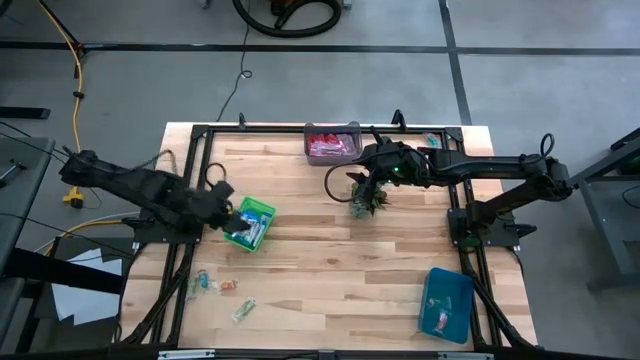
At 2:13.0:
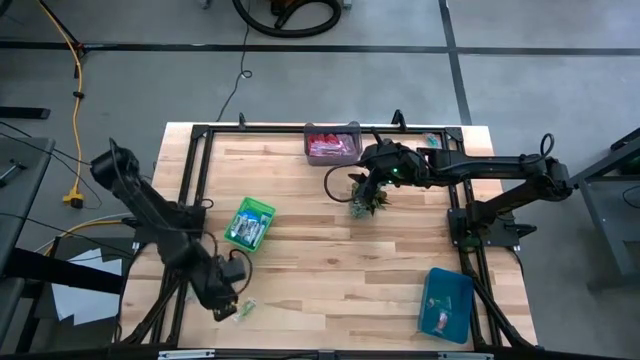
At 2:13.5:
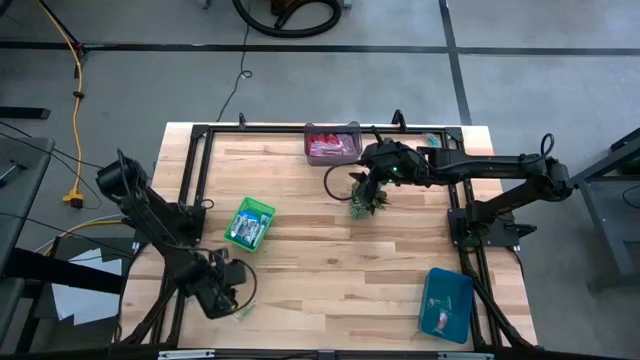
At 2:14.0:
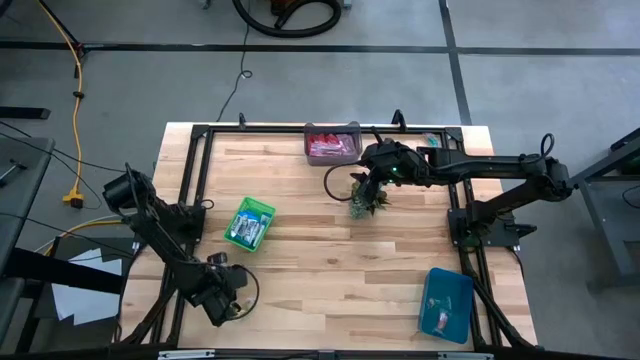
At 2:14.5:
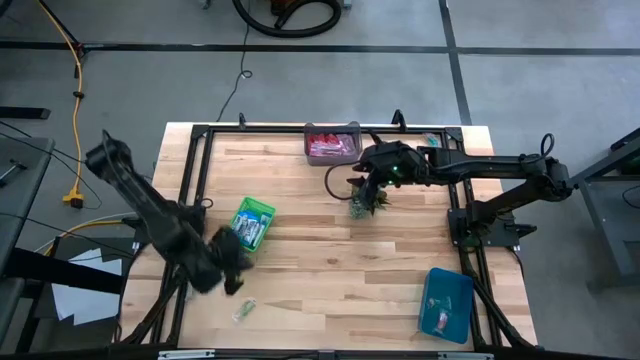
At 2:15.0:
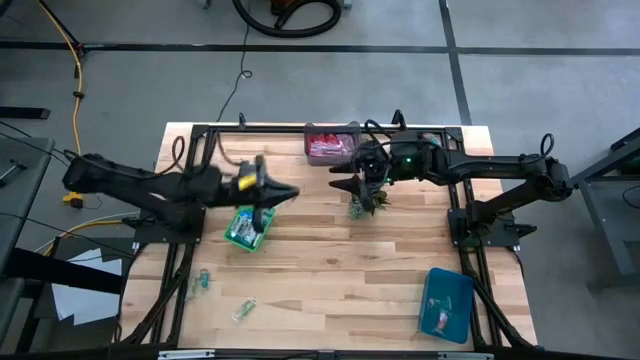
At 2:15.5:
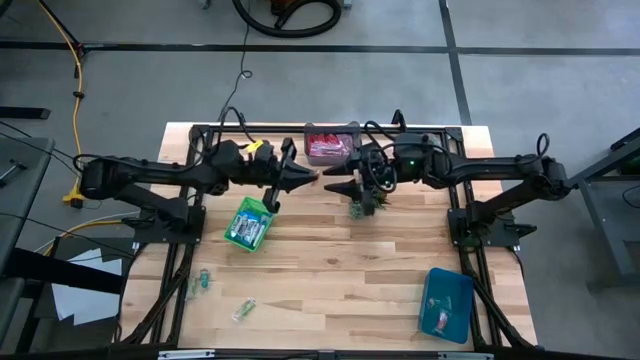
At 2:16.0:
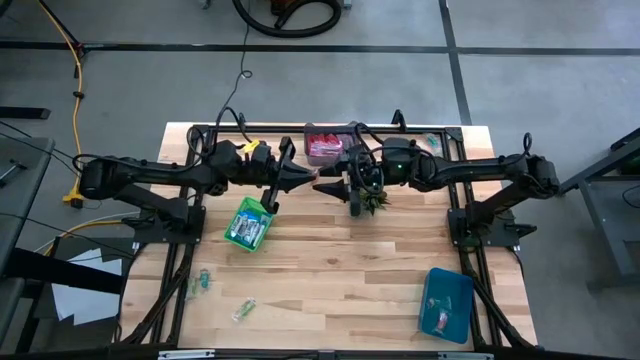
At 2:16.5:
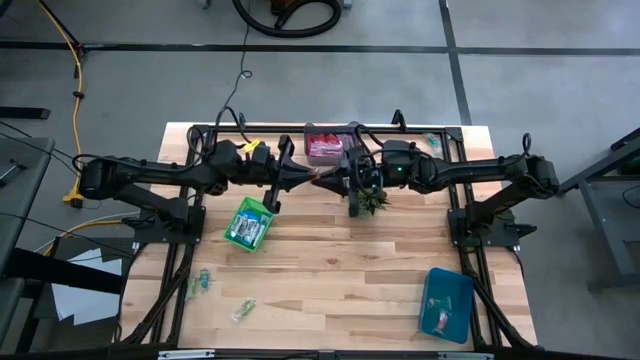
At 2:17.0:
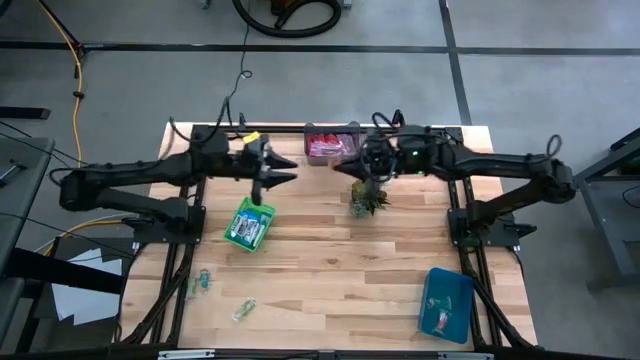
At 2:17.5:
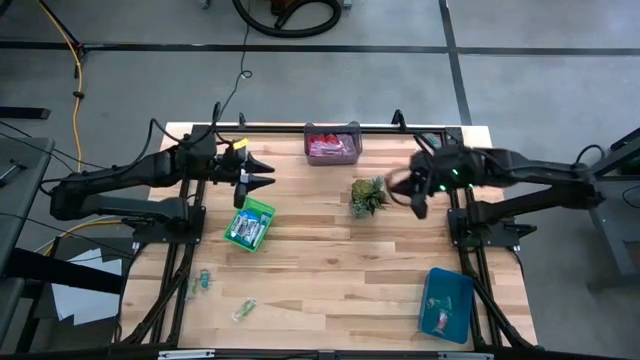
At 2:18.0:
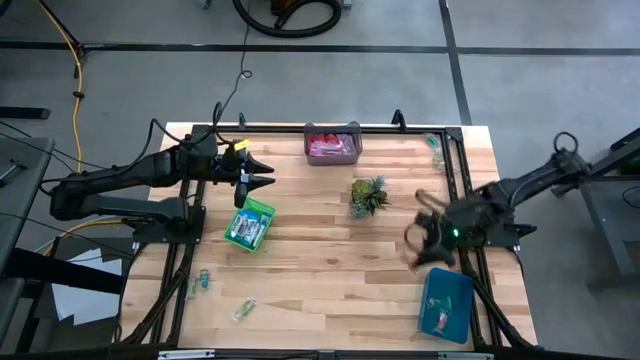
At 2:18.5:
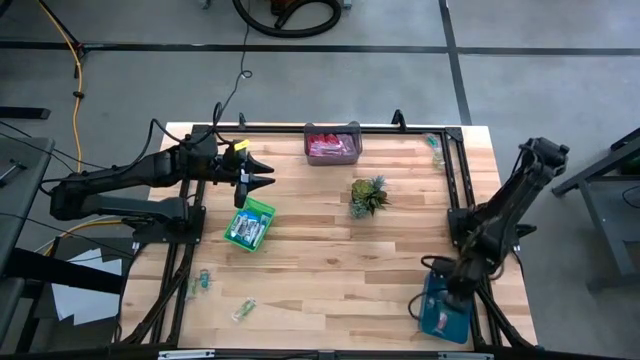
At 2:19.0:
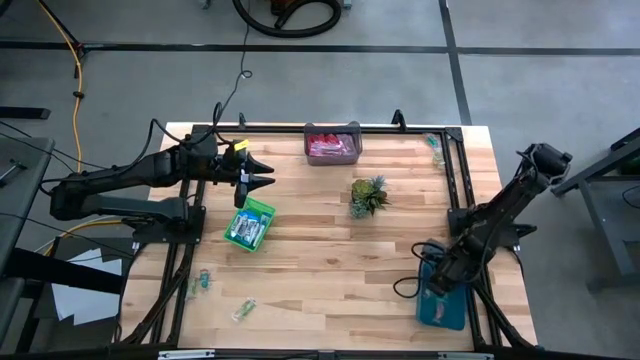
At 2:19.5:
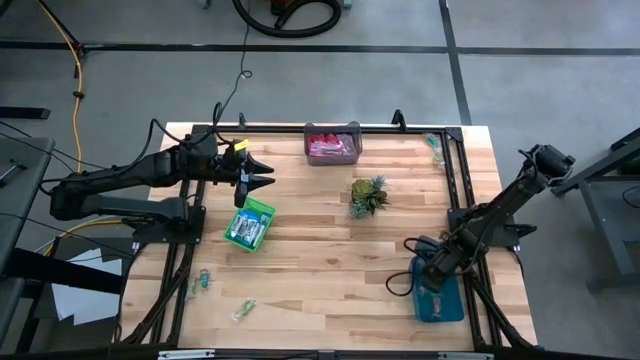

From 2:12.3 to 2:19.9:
Task: Sort candy
Put the transparent candy into the blue bin

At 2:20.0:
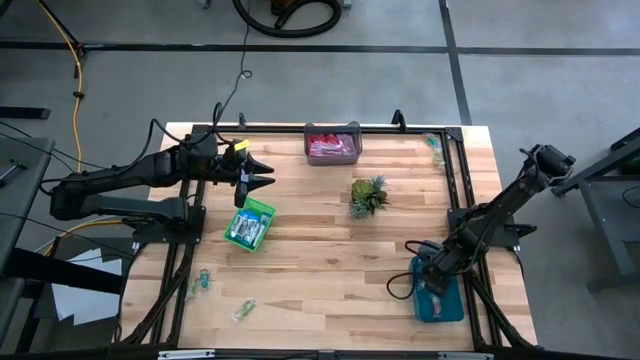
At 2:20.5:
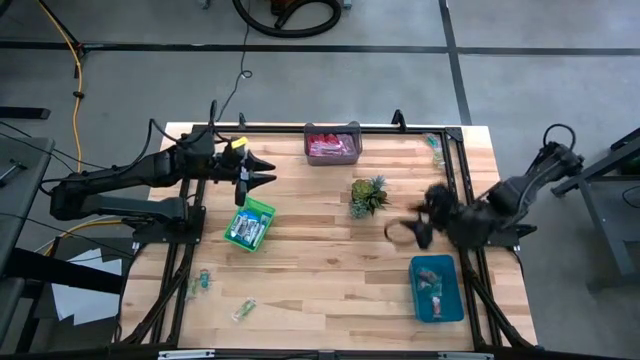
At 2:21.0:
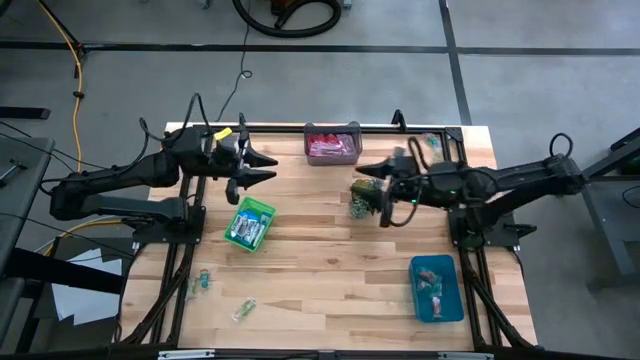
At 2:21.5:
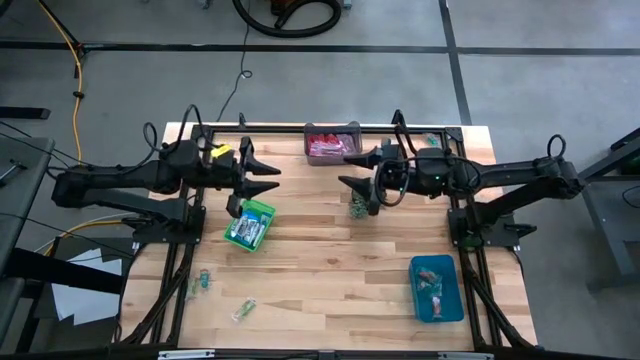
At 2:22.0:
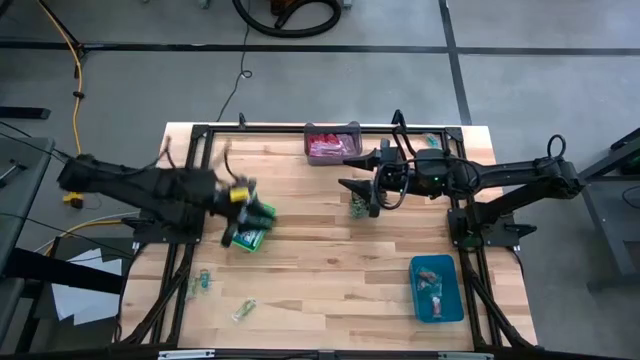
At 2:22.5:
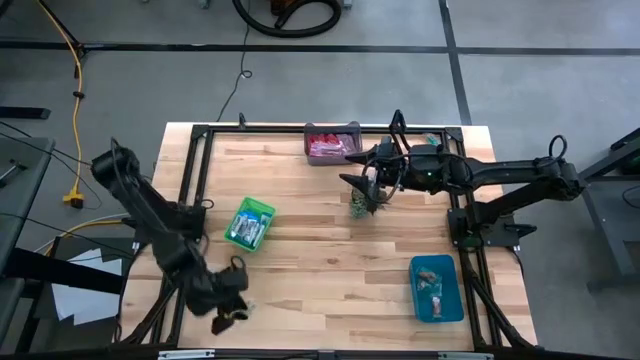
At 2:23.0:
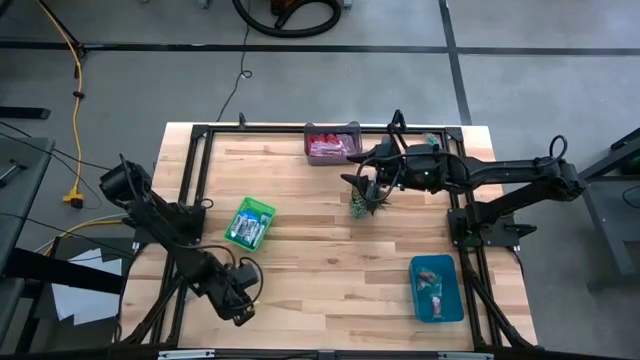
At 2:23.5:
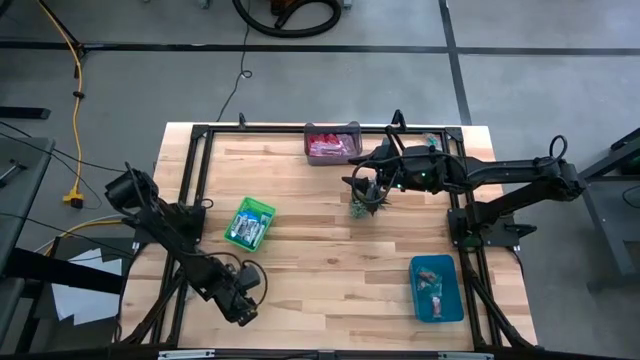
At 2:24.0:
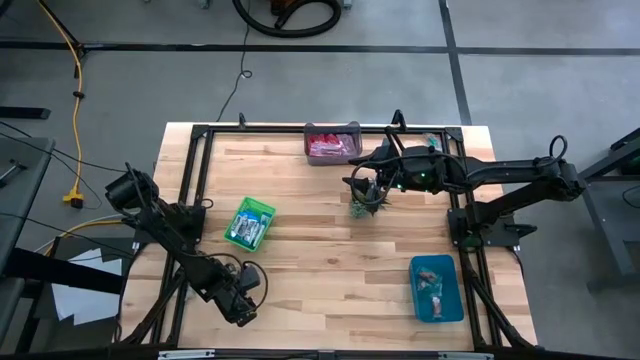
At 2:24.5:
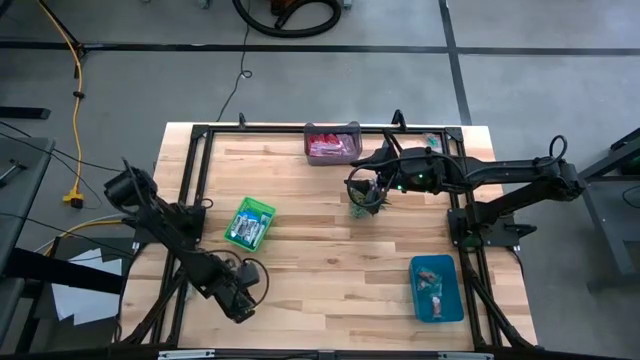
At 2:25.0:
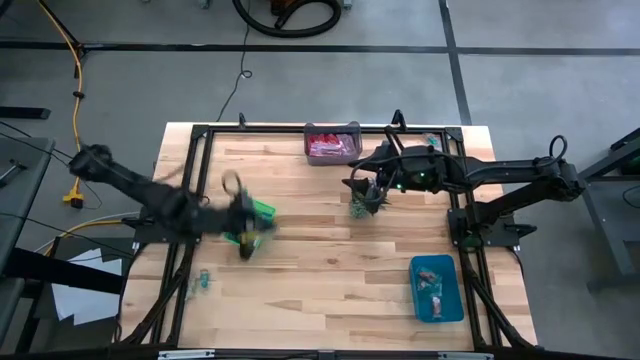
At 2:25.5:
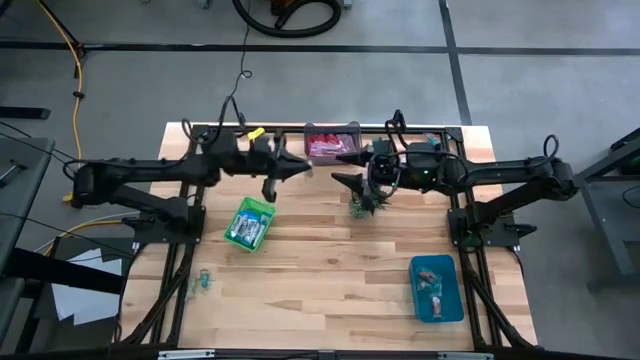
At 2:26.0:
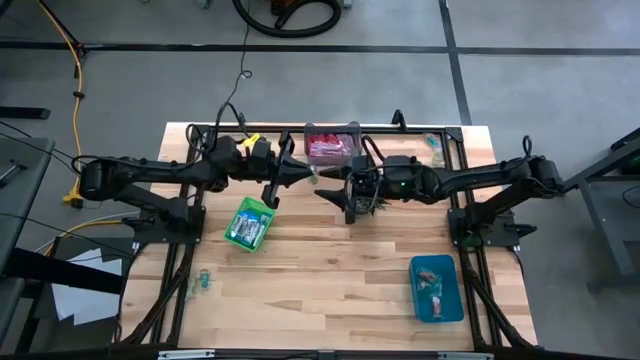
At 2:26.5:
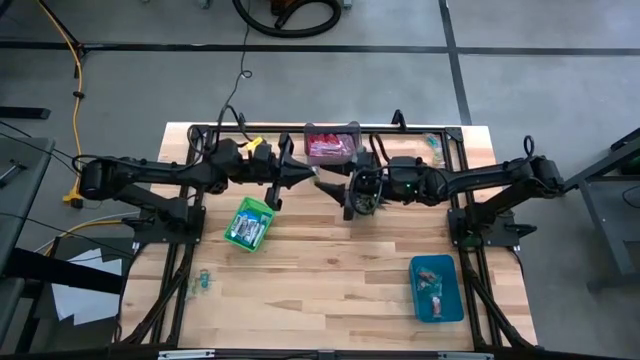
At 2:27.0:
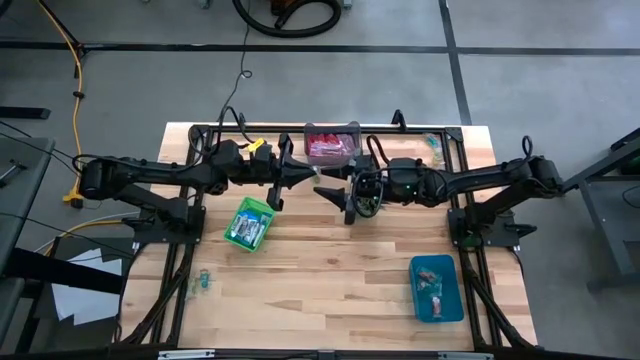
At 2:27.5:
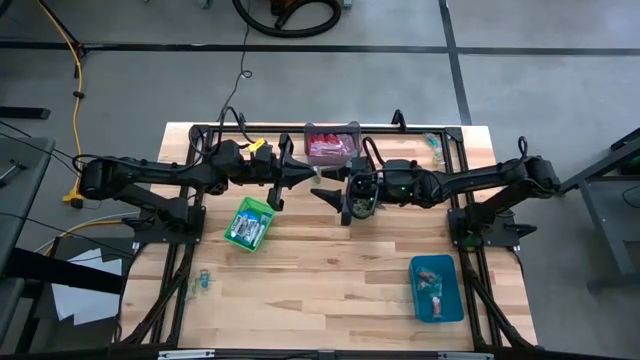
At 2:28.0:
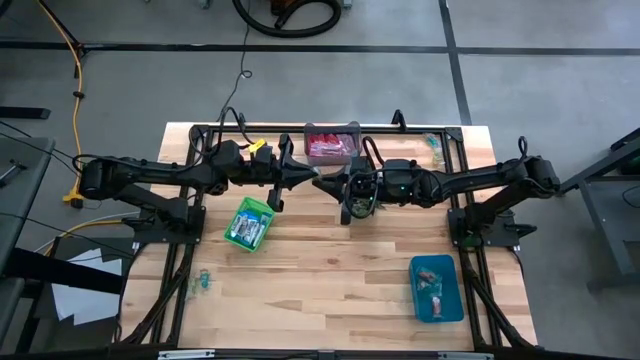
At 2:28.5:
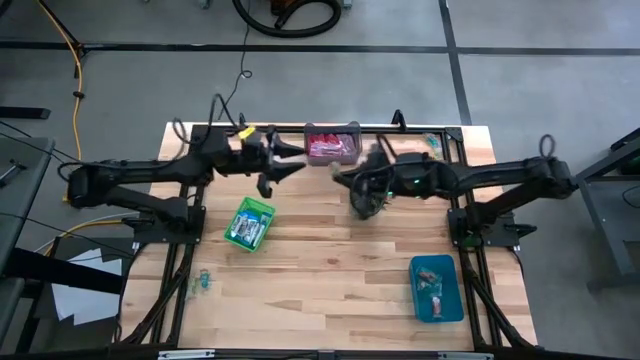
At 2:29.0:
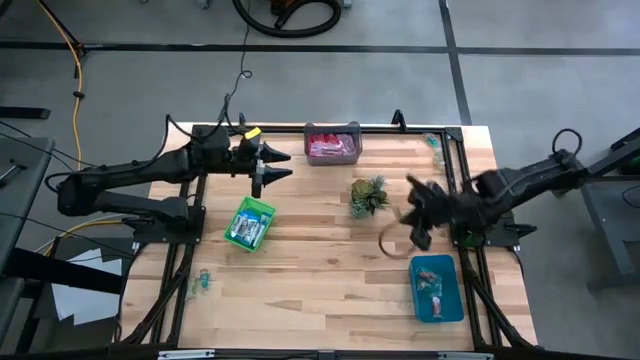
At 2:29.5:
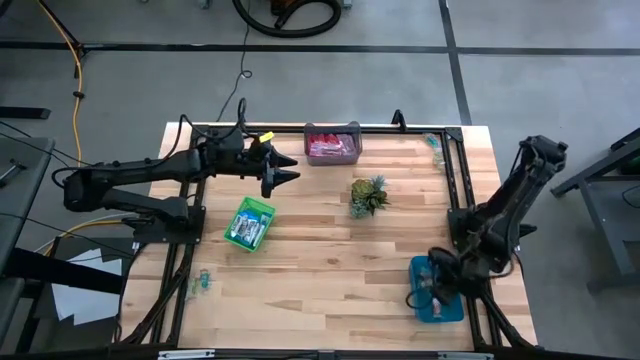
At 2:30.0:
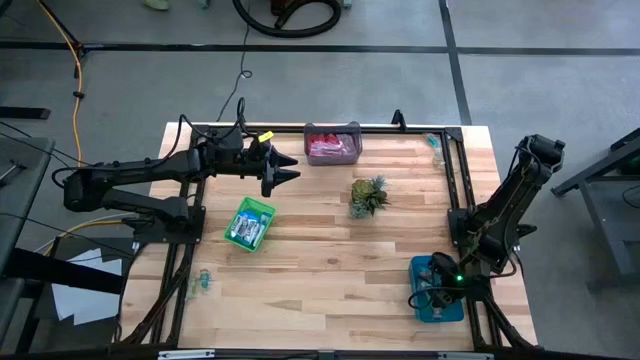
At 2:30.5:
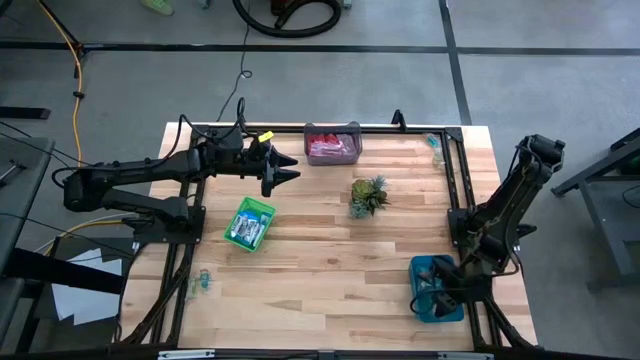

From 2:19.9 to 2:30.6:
Put the transparent candy into the blue bin
